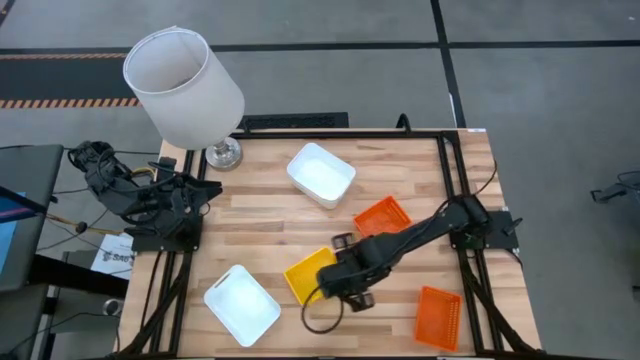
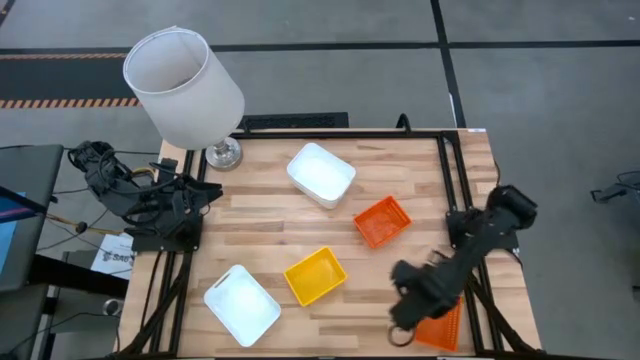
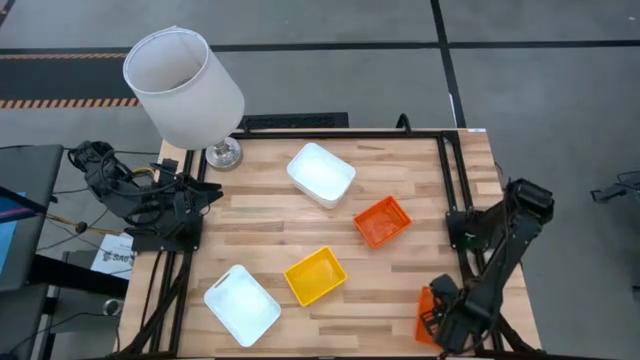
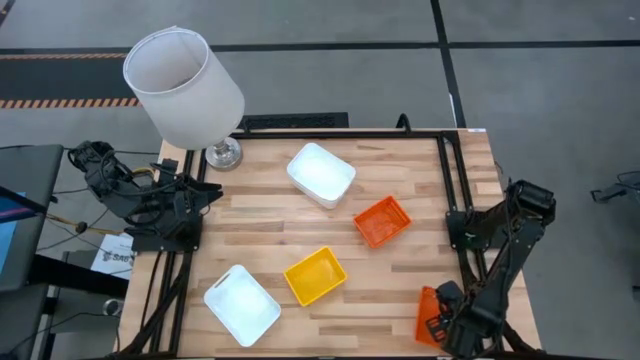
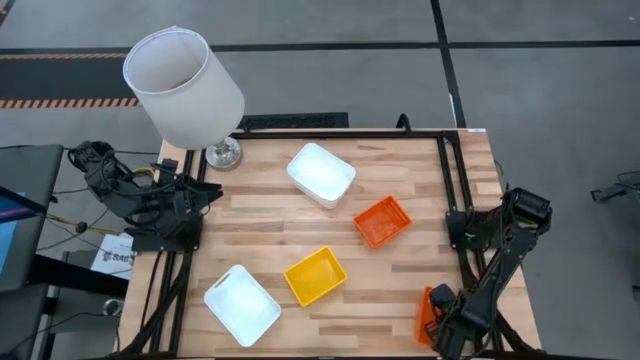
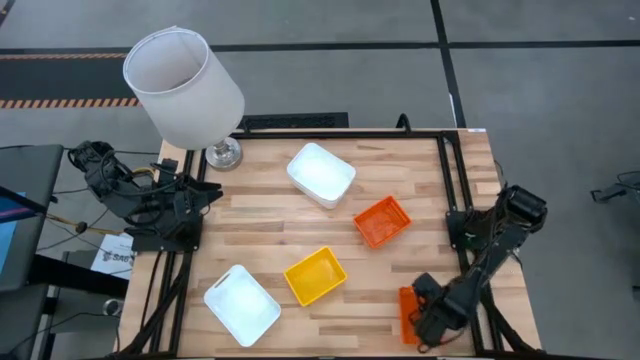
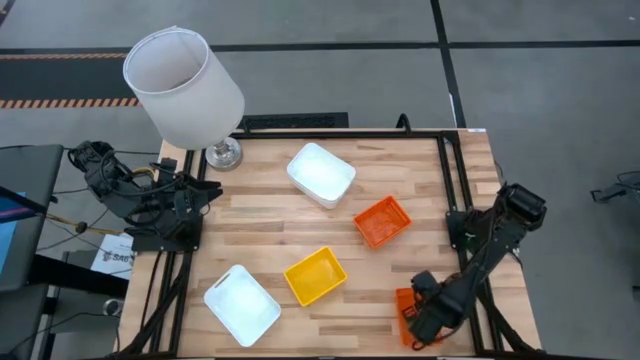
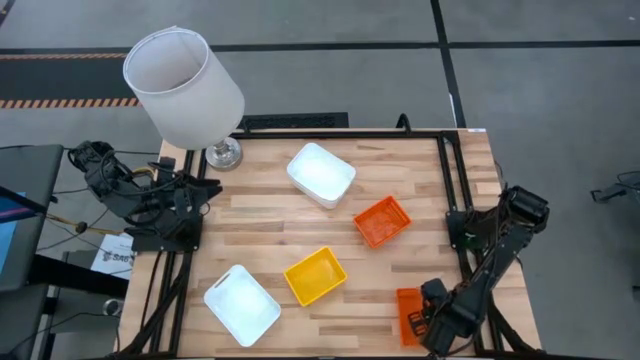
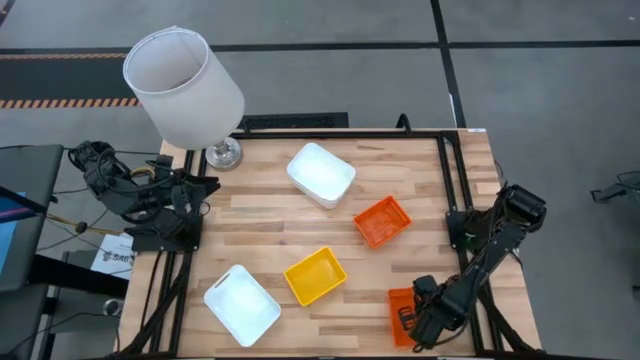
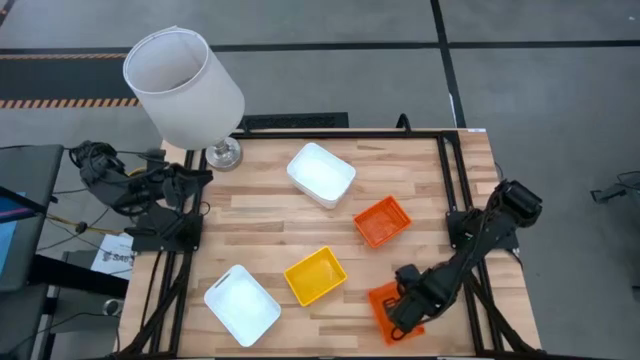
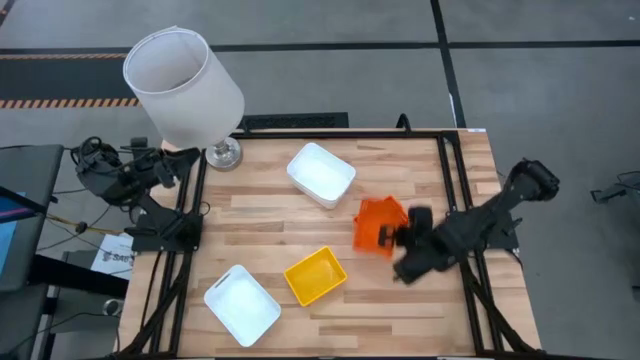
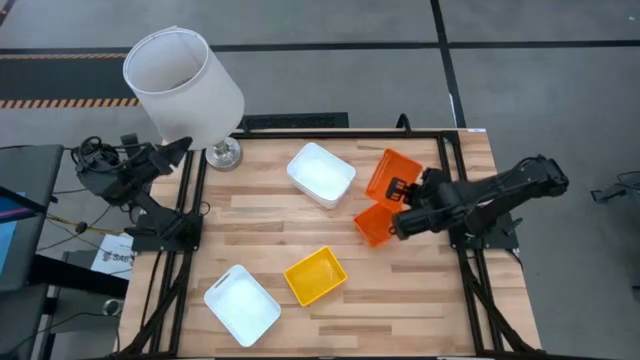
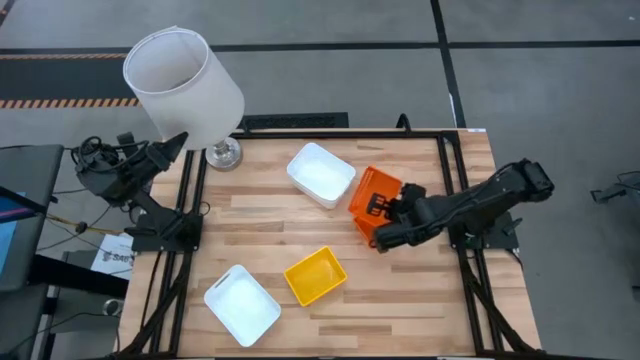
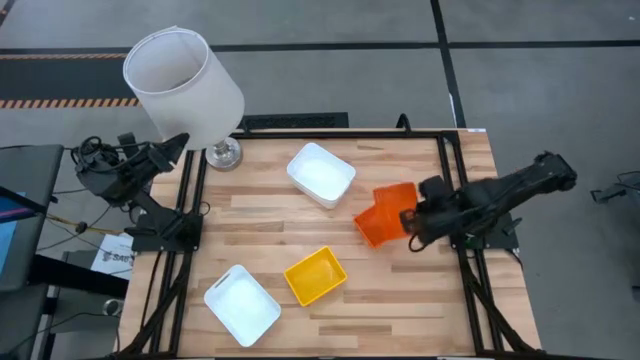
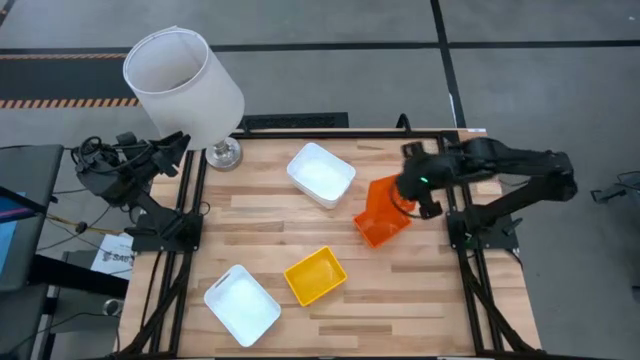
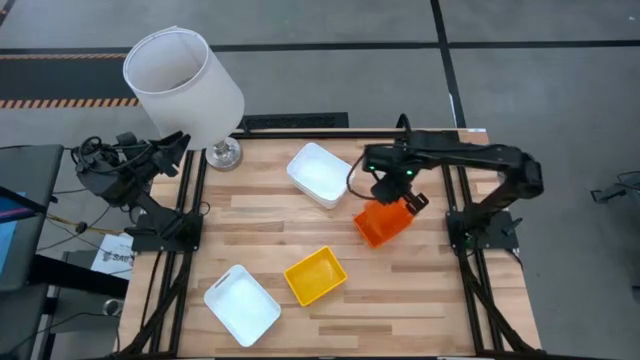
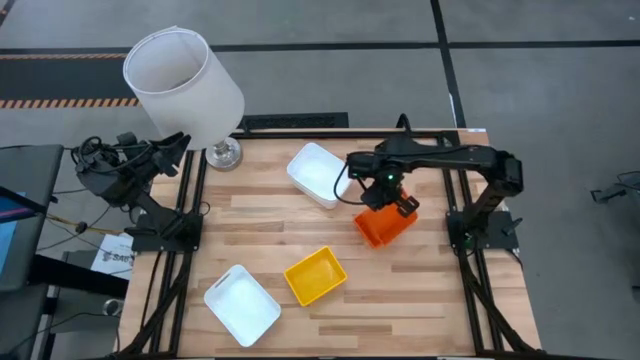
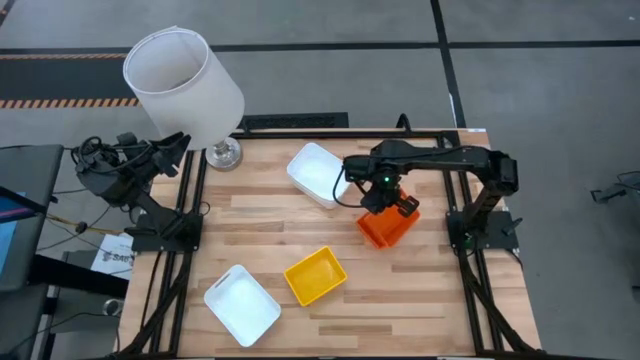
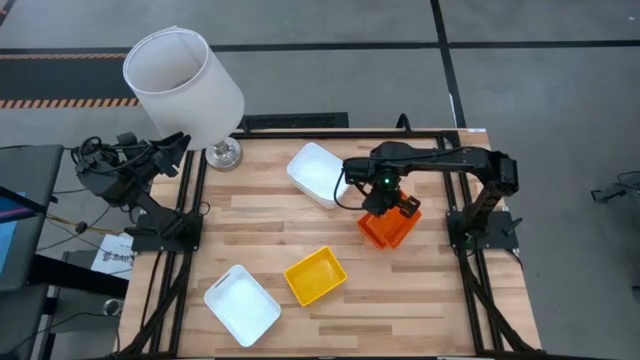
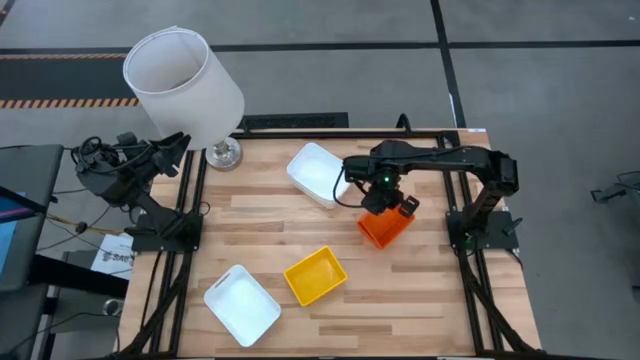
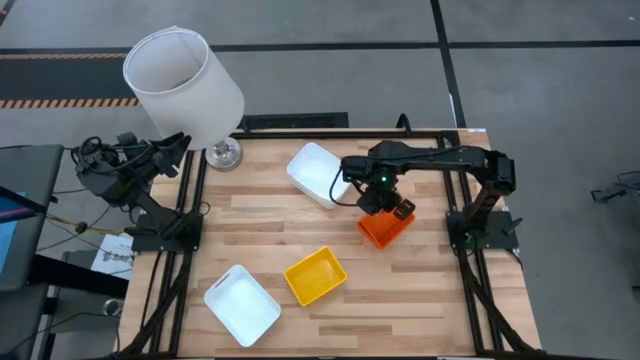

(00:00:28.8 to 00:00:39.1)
Stack the bottom orange bin on the top orange bins

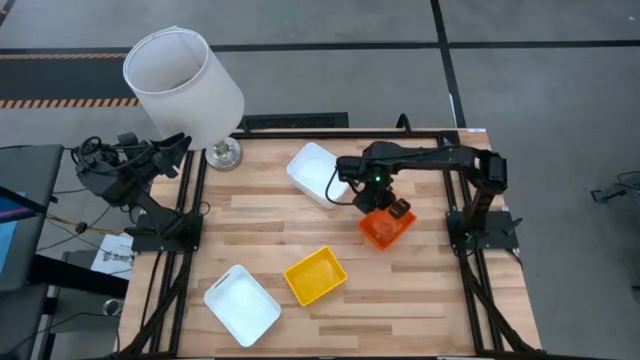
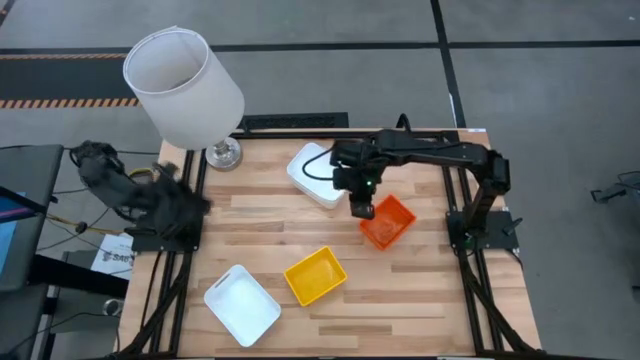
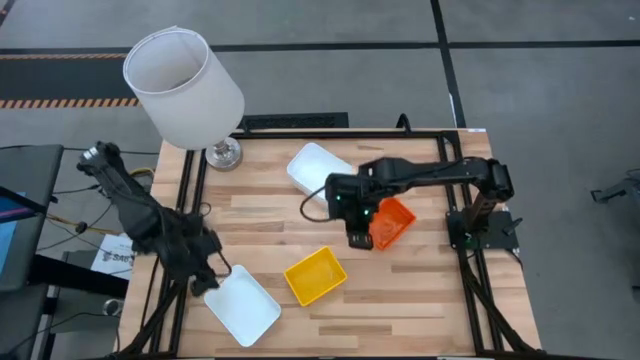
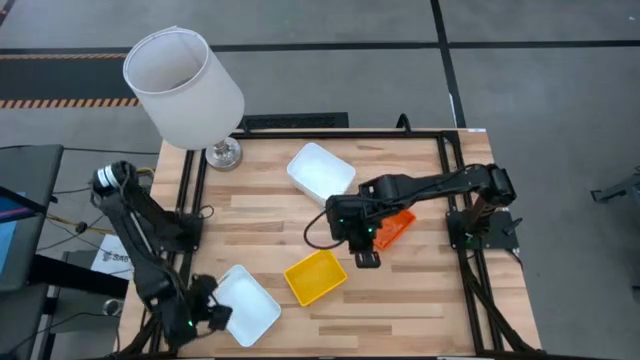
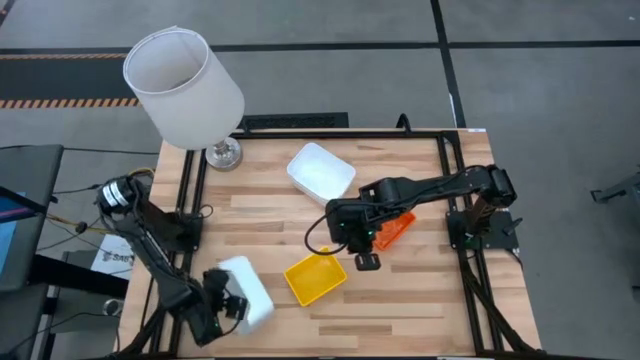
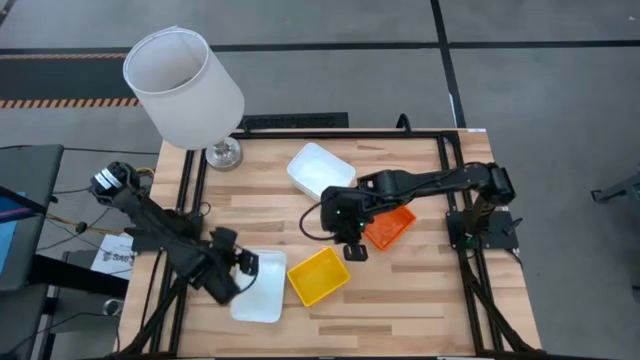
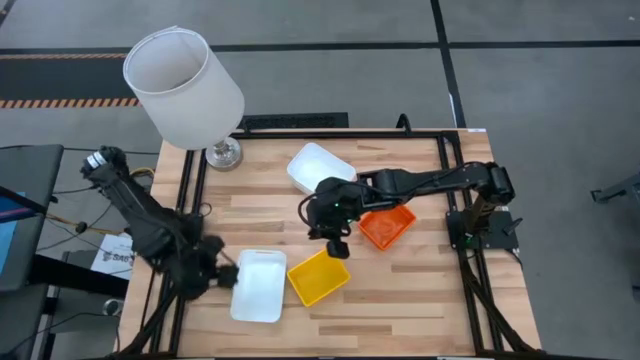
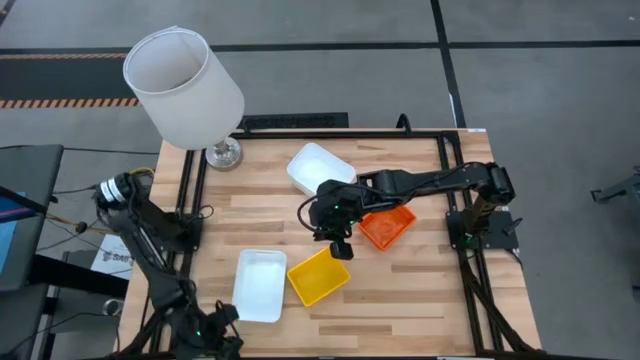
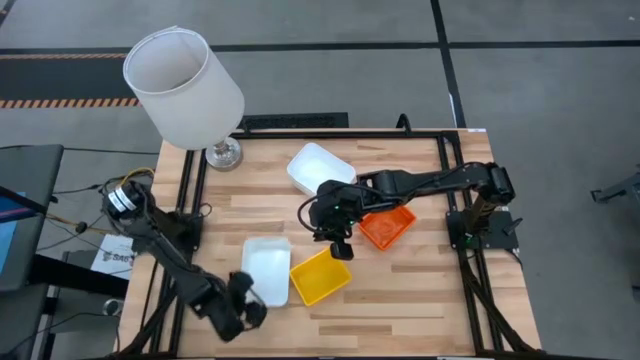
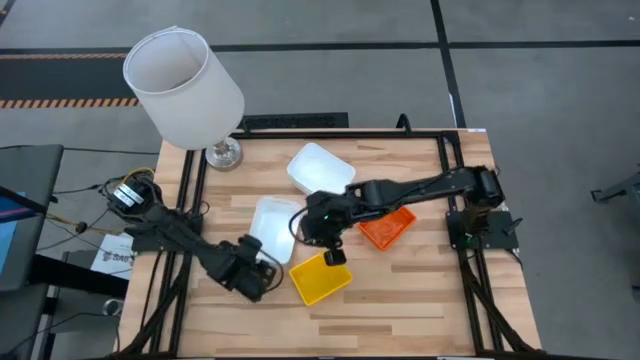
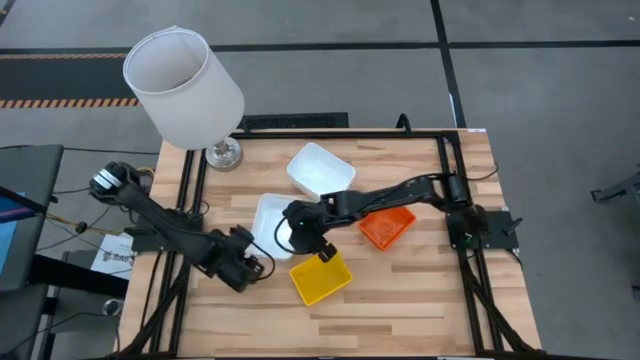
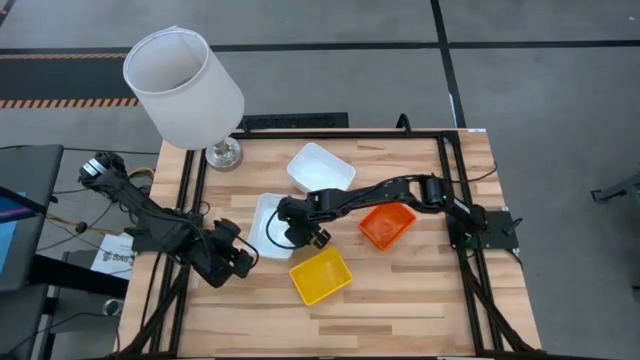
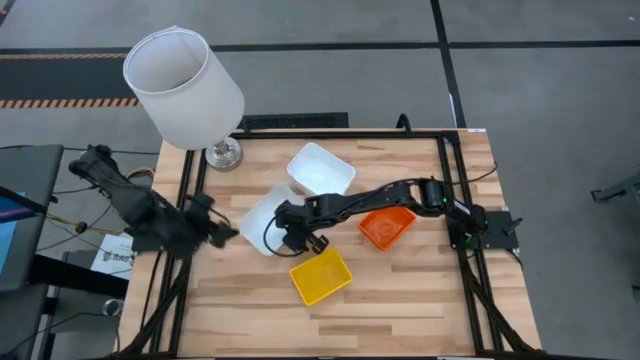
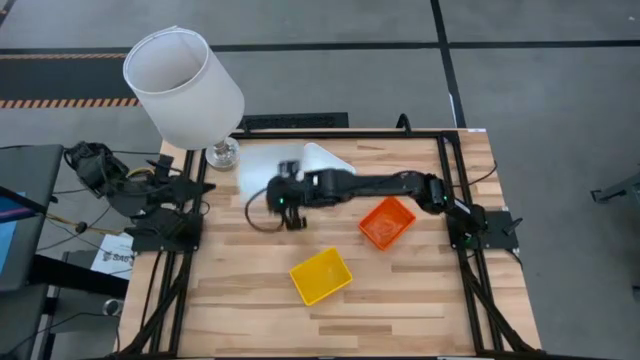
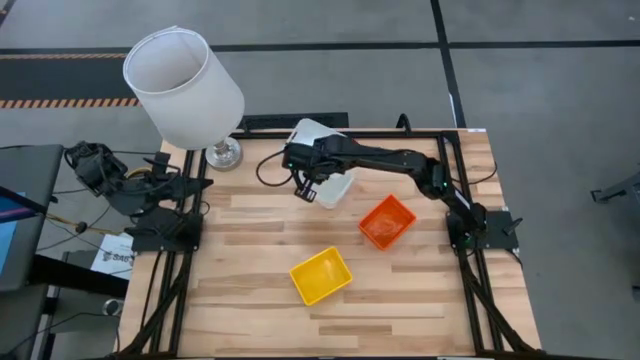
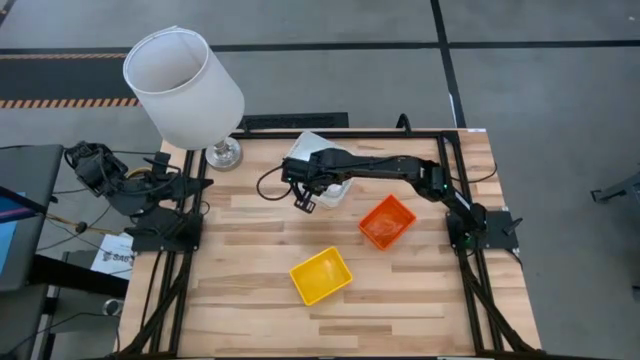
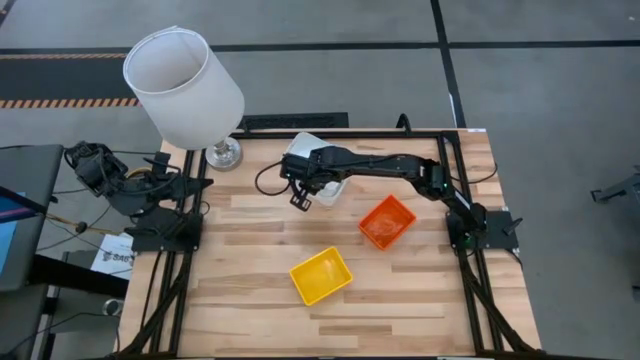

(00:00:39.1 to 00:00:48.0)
Stack the bottom white bin on the top white bins

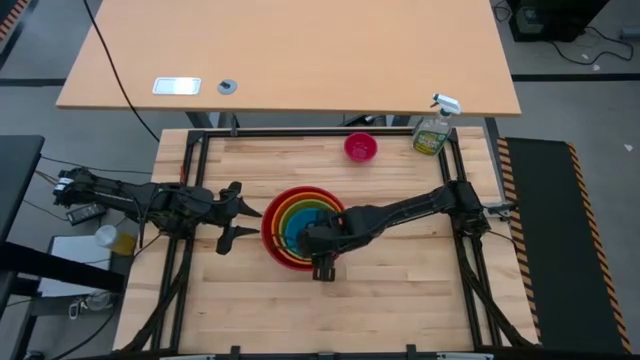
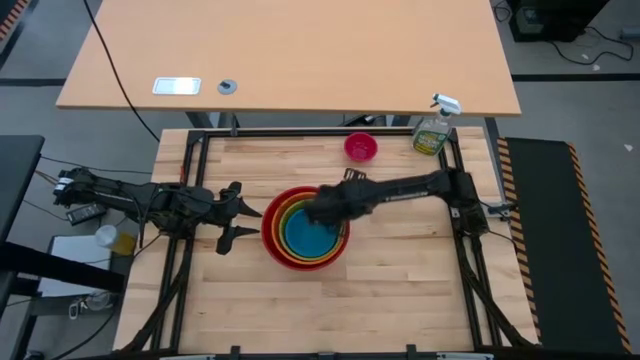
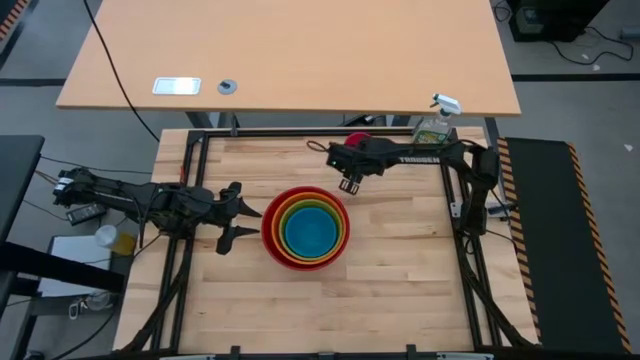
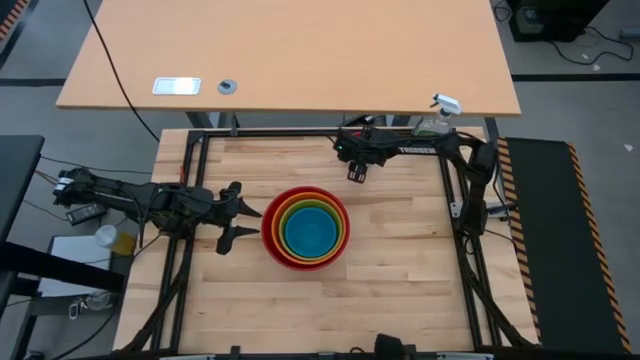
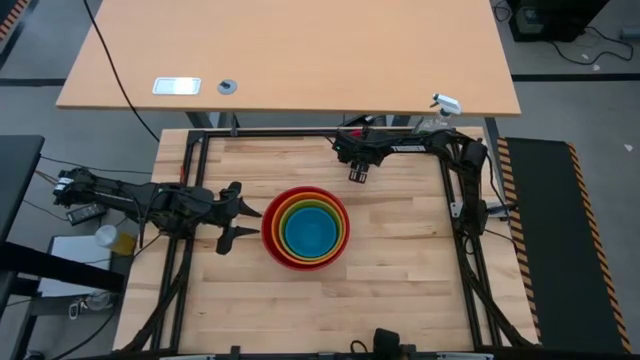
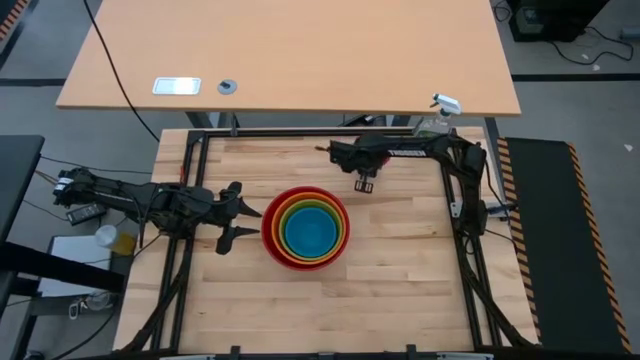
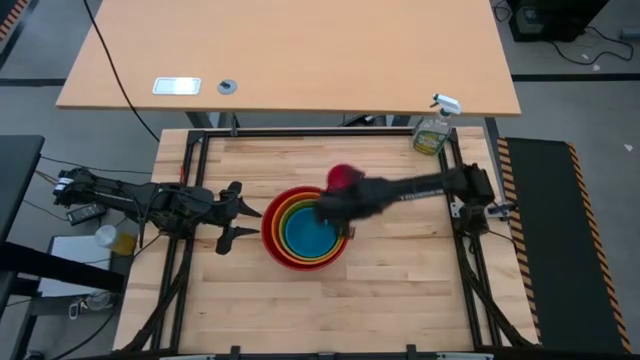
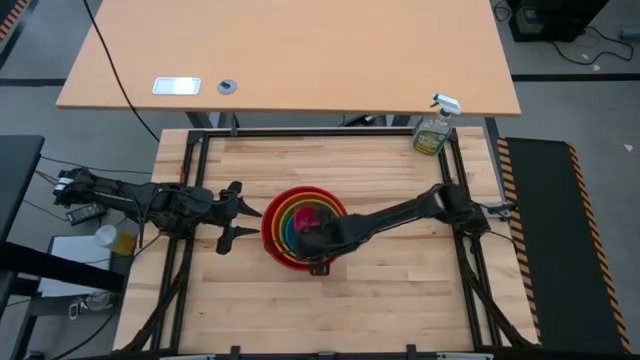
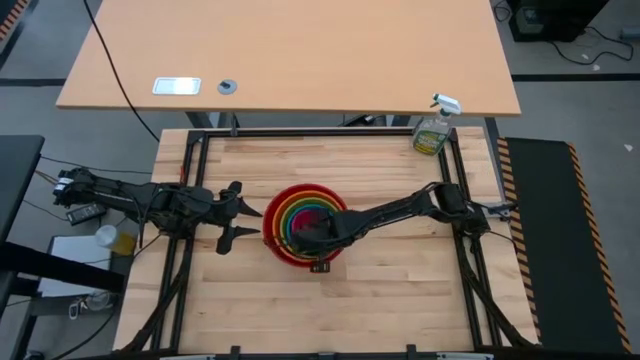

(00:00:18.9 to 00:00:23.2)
Stack the pink bowl on top of the blue bowl
